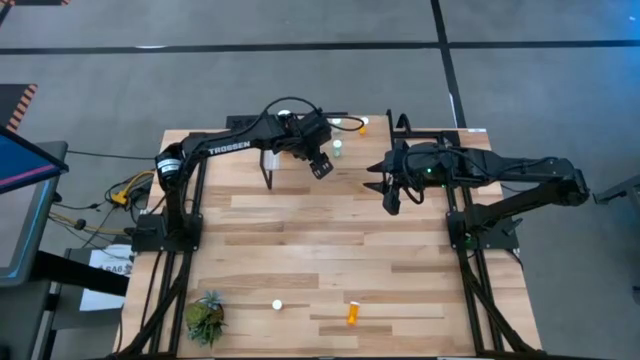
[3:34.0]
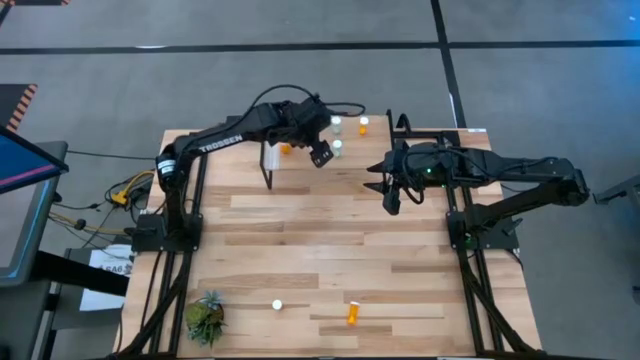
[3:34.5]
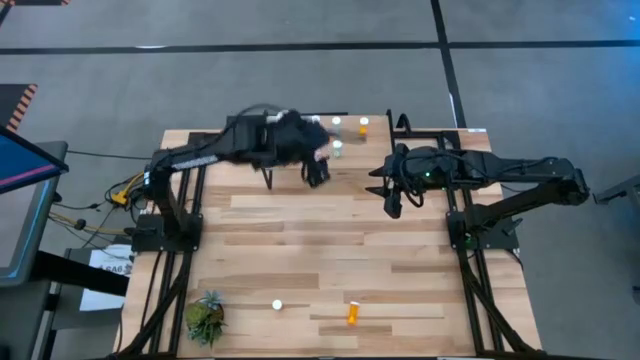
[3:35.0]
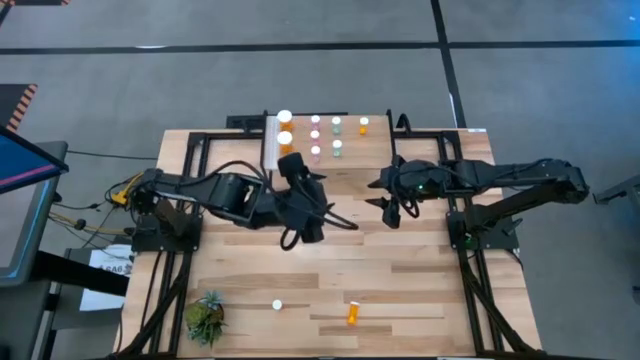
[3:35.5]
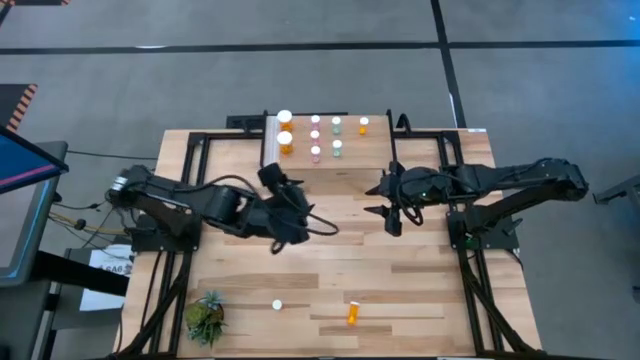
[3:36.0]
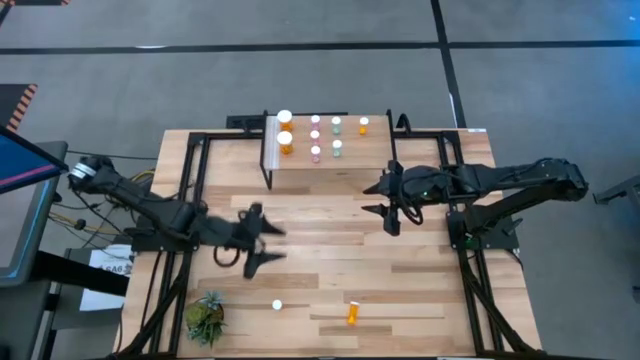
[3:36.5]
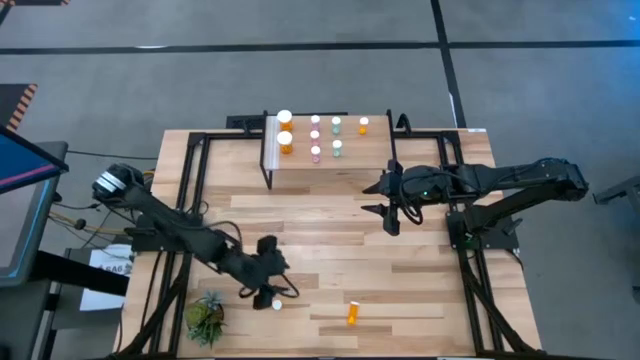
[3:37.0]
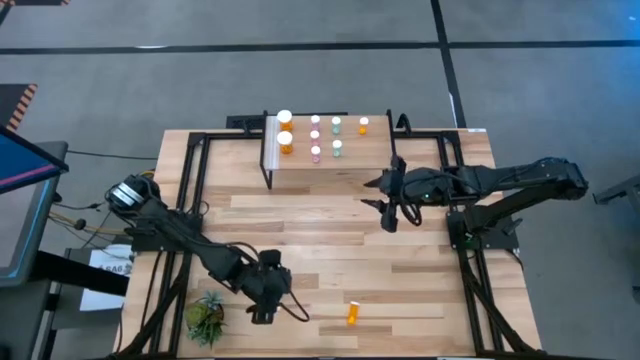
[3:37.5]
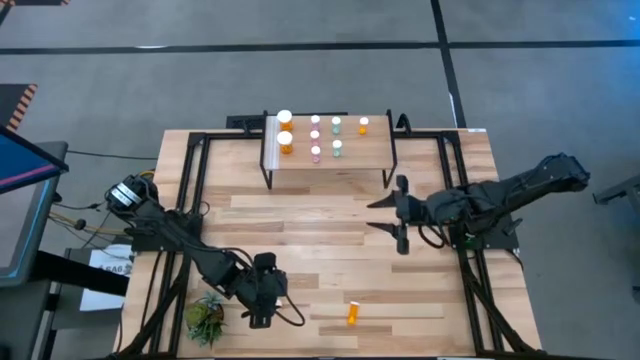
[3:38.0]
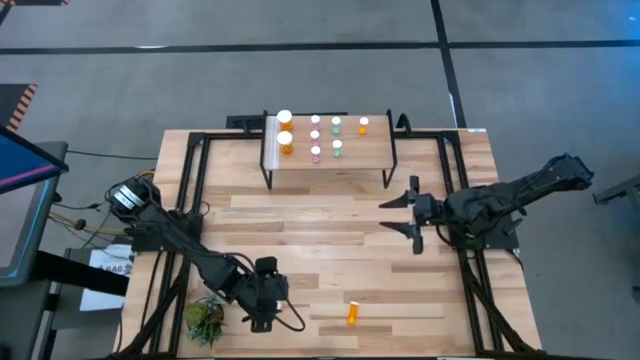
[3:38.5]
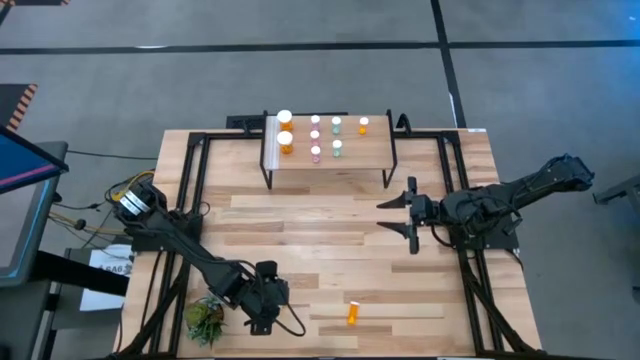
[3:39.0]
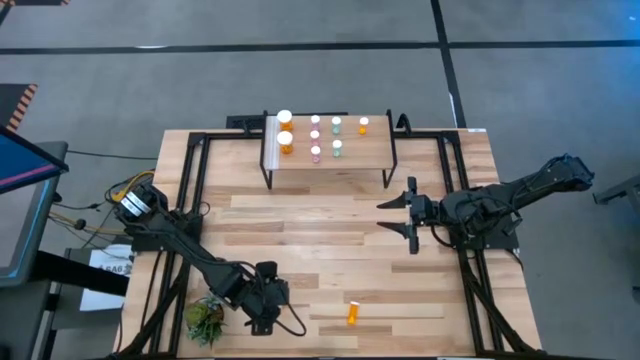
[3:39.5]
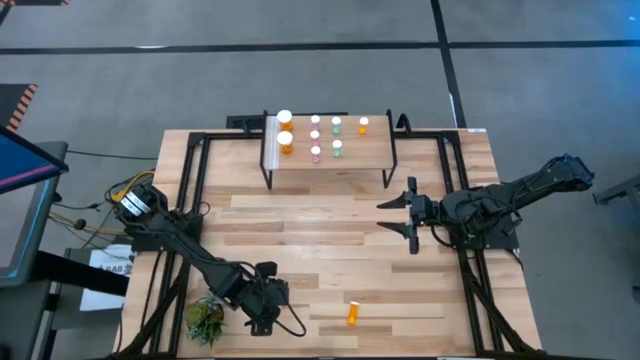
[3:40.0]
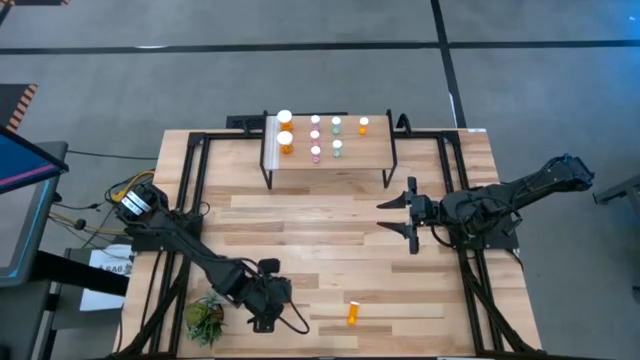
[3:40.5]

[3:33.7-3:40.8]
Task: Pick and place medicine bottles onto shelf by color
Put the left small orange pill bottle on the shelf aligned with the other small orange pill bottle

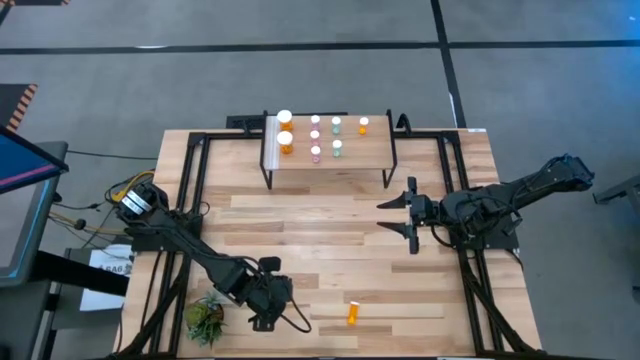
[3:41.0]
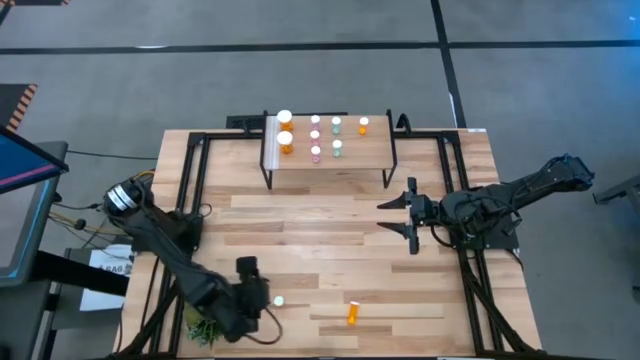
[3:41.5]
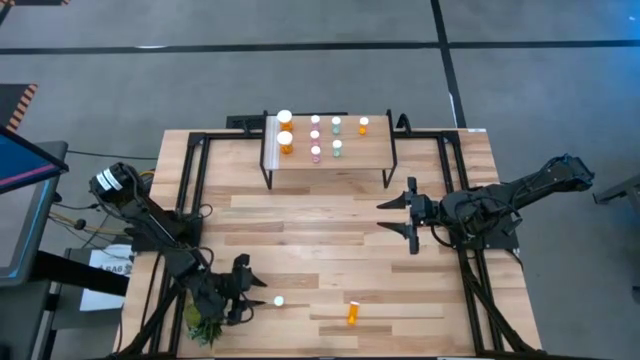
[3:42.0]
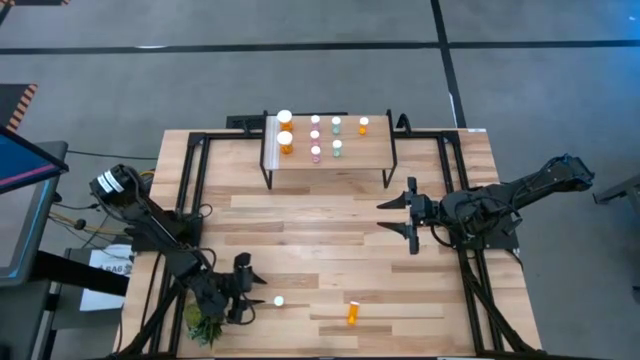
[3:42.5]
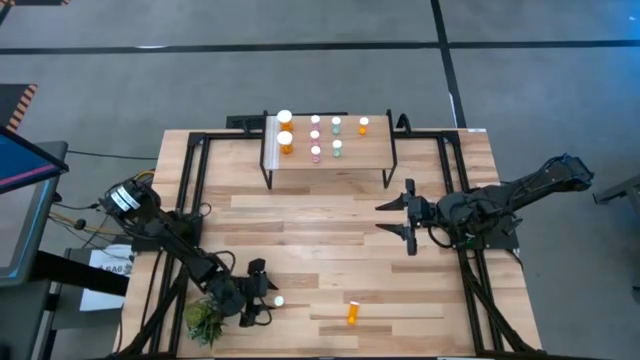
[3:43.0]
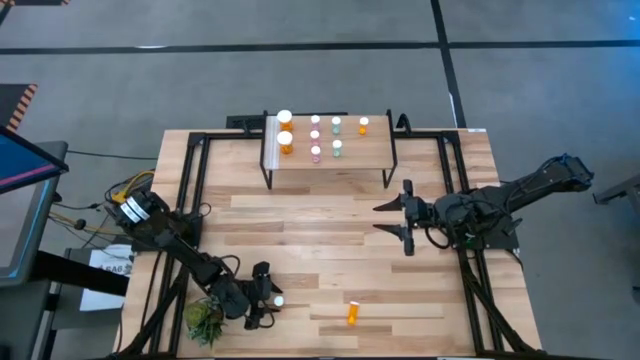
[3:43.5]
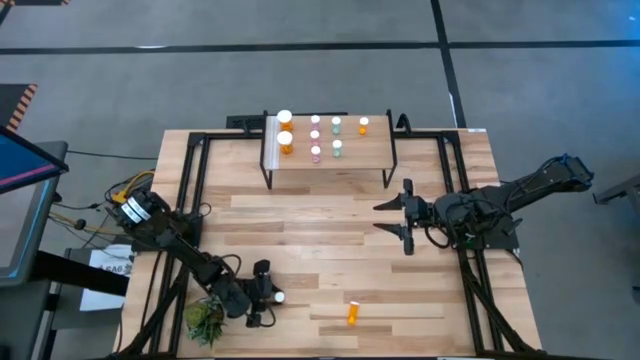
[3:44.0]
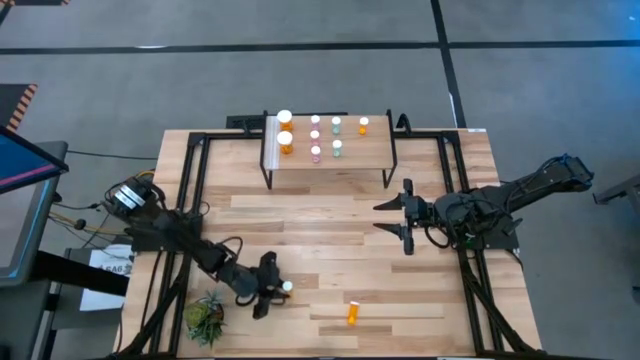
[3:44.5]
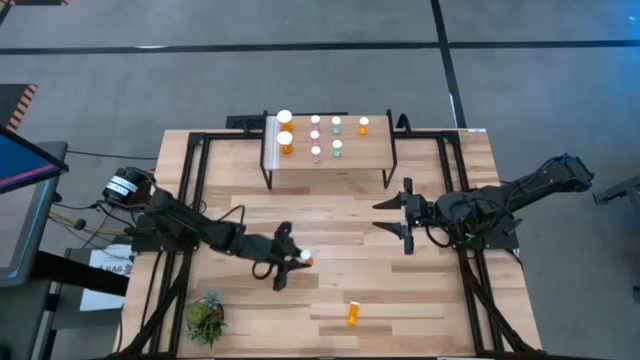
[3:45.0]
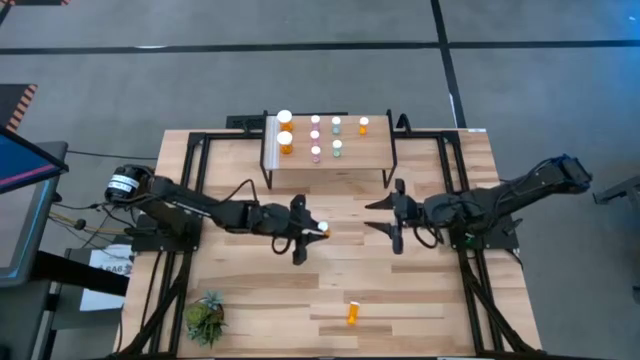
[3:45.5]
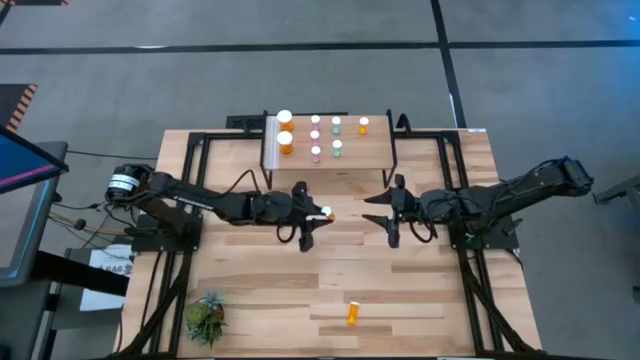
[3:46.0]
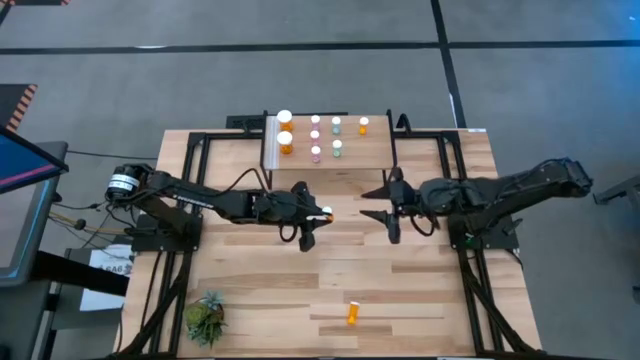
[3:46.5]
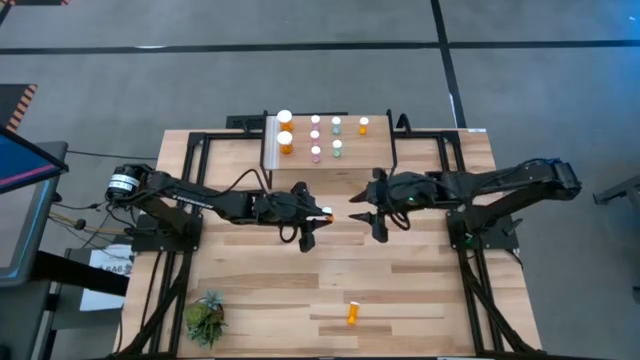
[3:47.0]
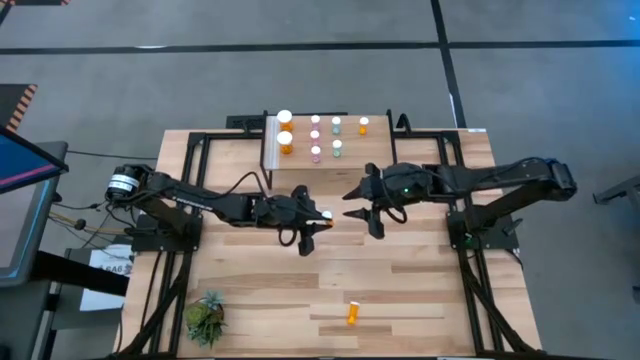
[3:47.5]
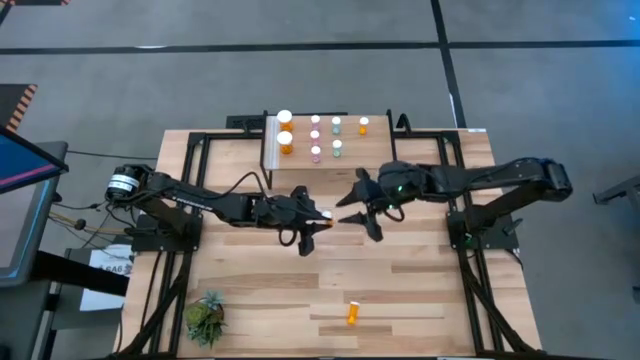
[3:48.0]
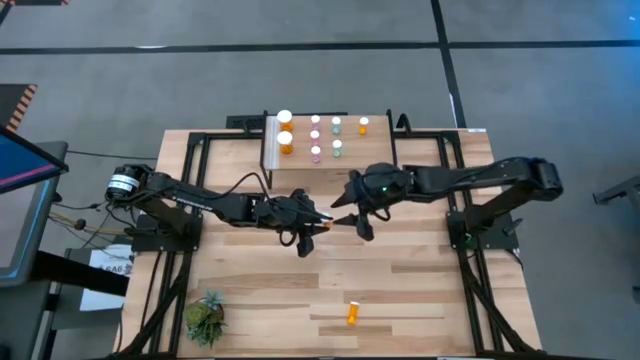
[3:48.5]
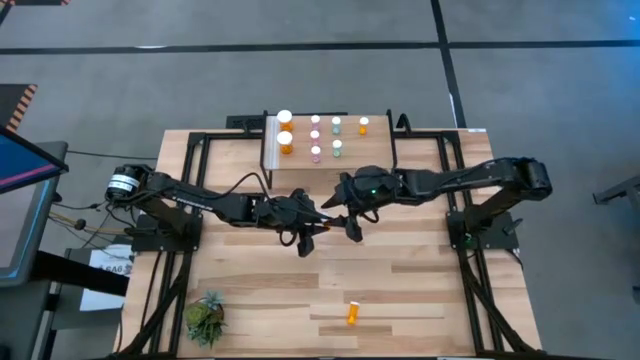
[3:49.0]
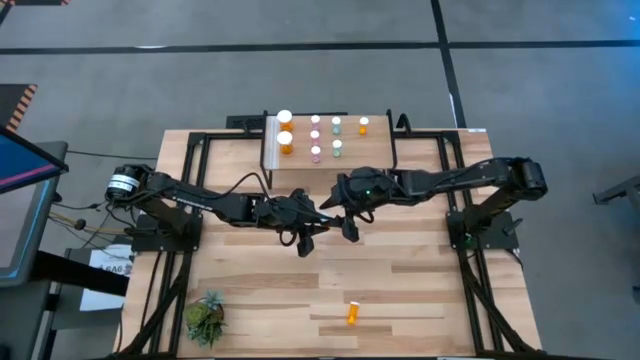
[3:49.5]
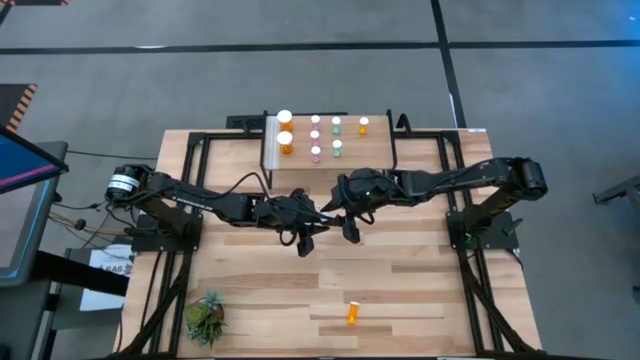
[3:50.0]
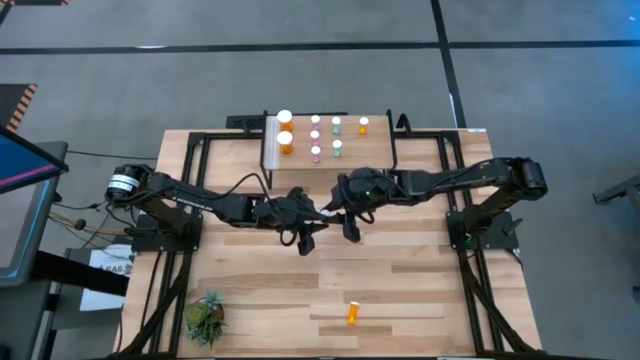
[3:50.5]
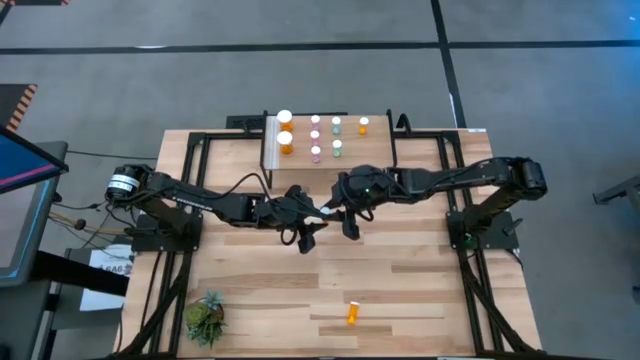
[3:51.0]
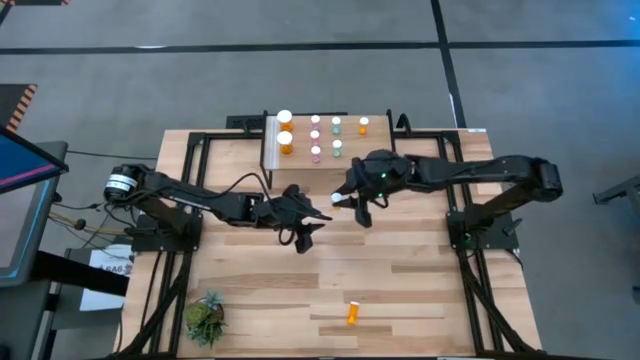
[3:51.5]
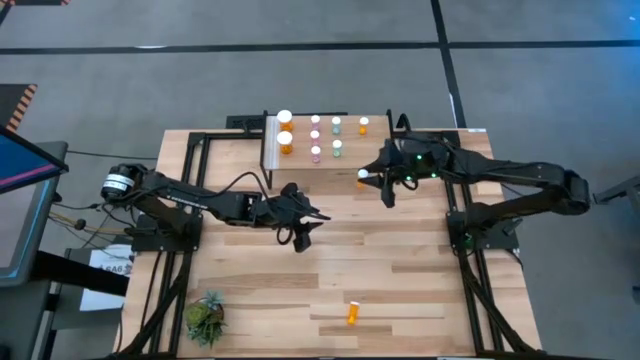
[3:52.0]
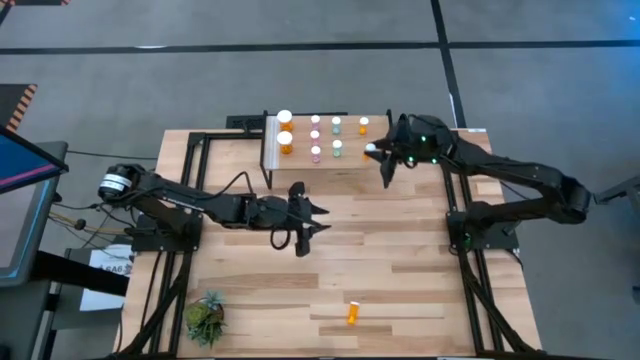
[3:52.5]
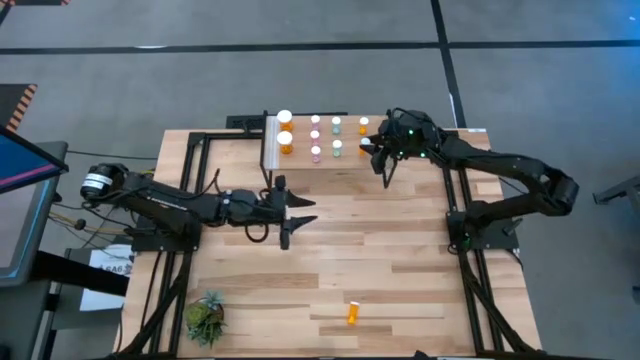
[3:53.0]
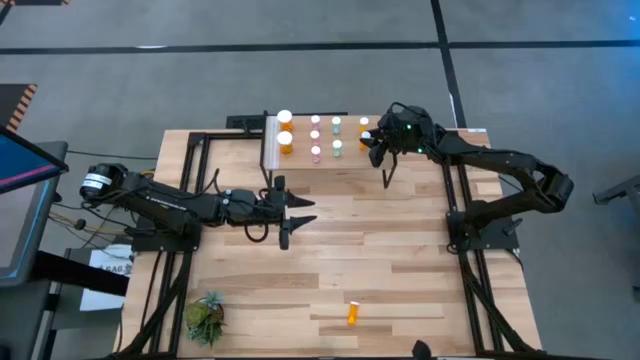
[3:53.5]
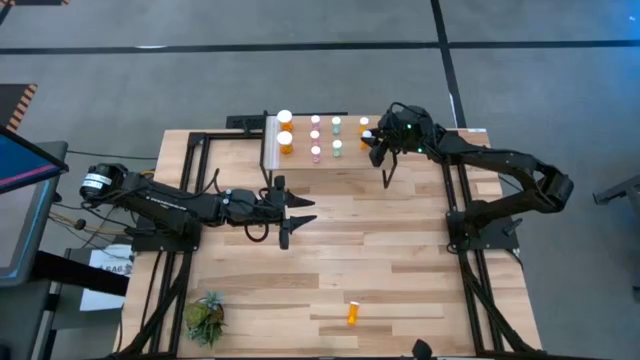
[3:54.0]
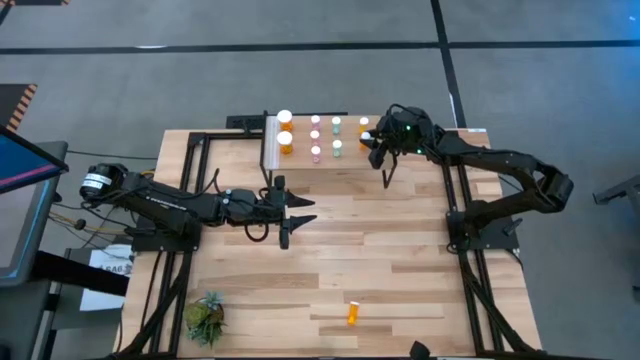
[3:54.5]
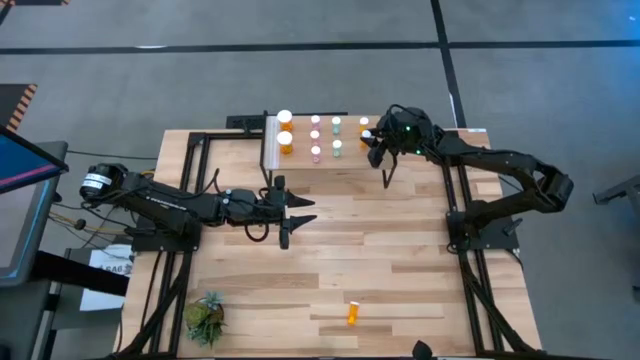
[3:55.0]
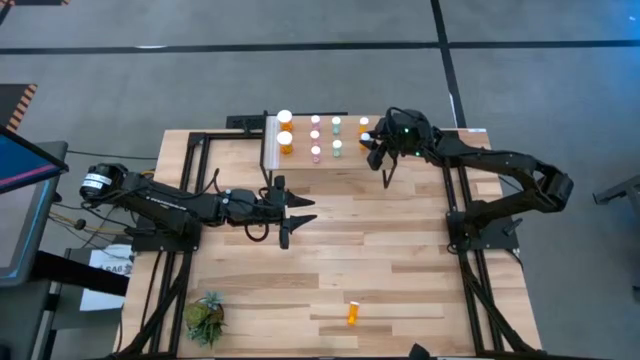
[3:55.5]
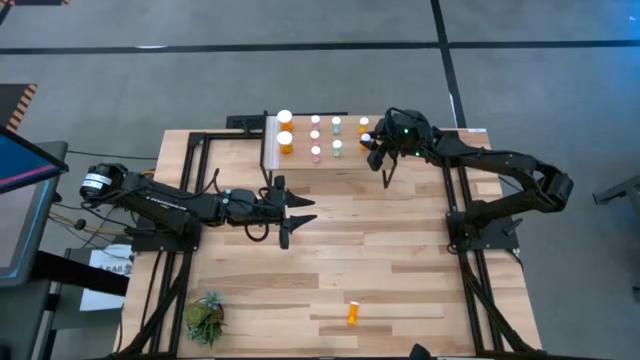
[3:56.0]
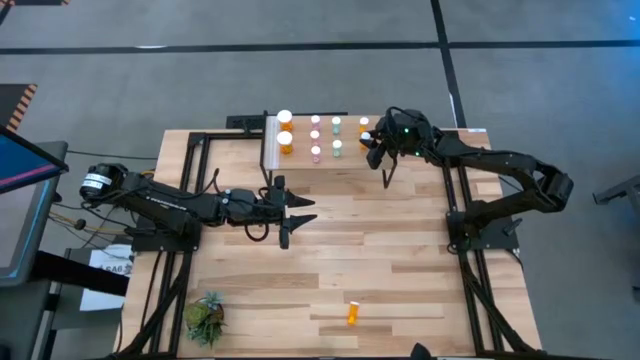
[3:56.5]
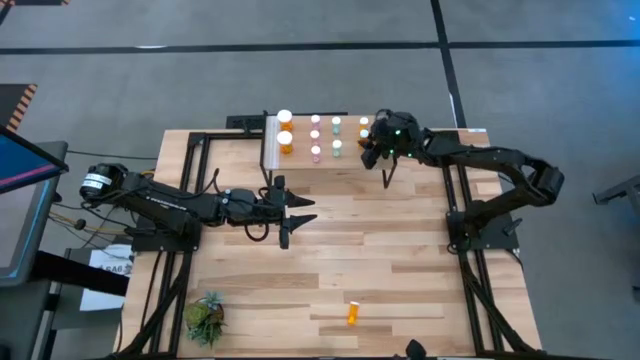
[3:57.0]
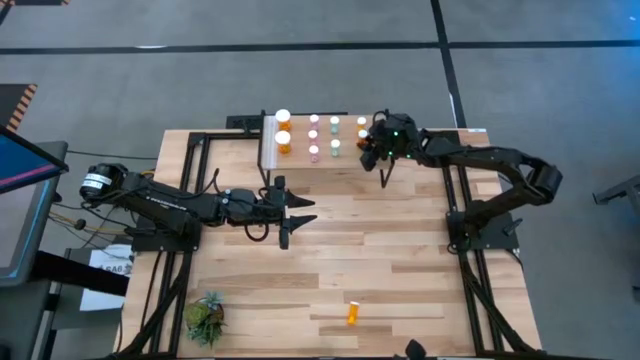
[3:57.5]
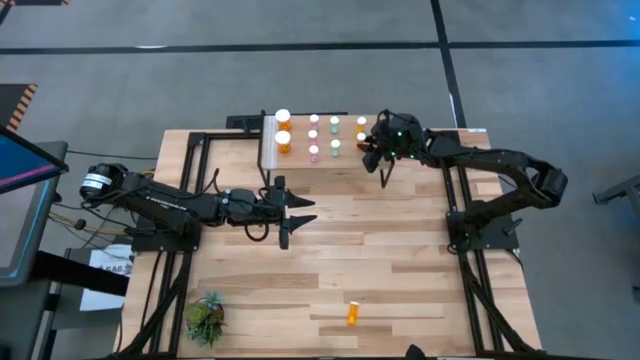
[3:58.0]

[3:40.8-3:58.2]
Put the left small orange pill bottle on the shelf aligned with the other small orange pill bottle
